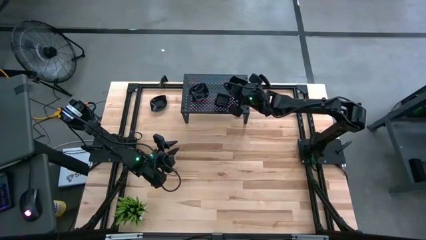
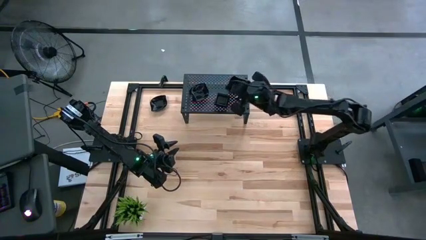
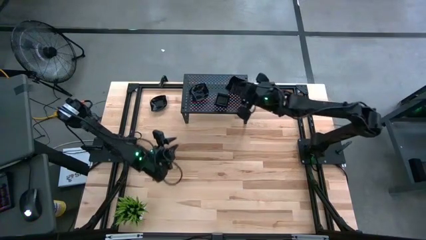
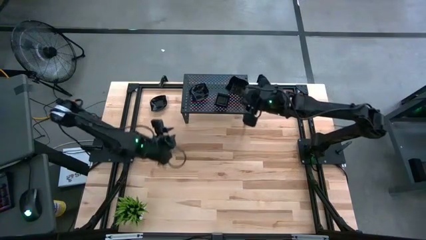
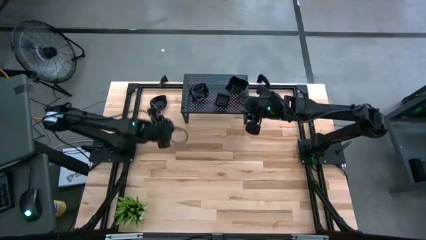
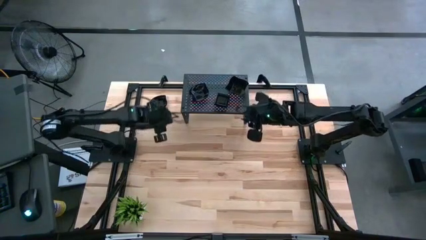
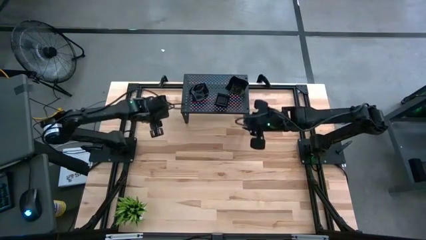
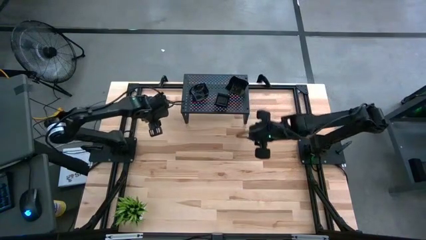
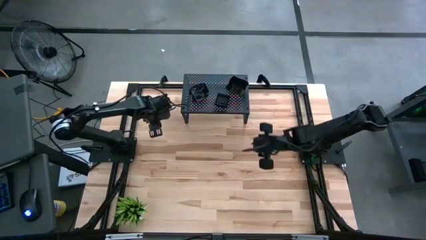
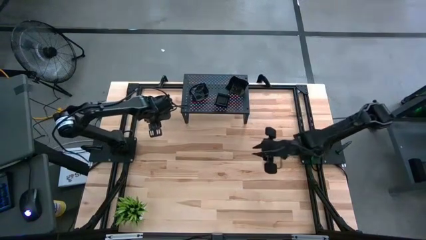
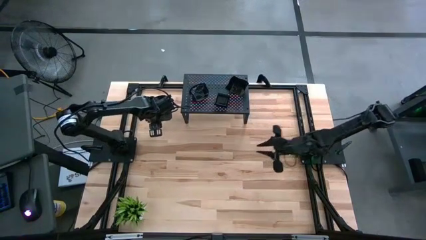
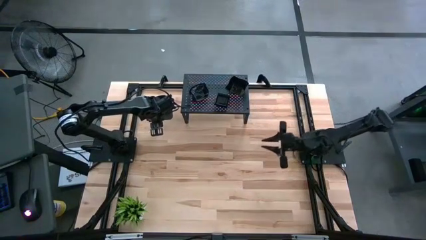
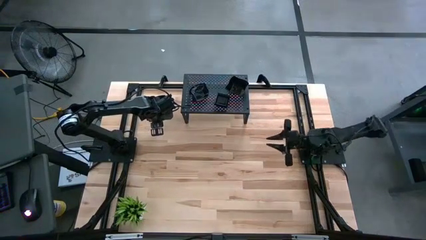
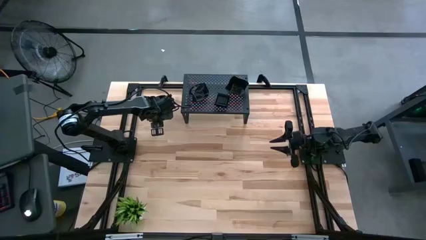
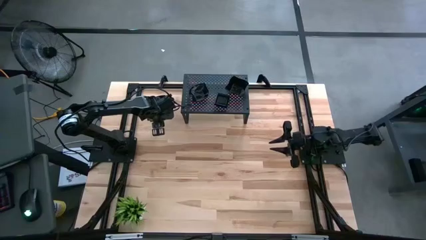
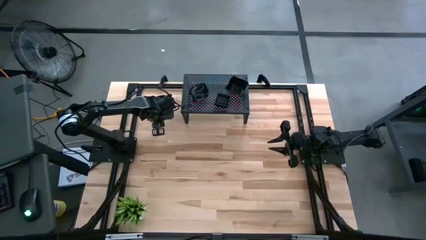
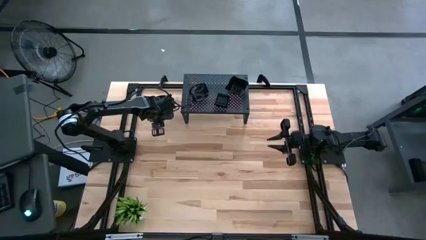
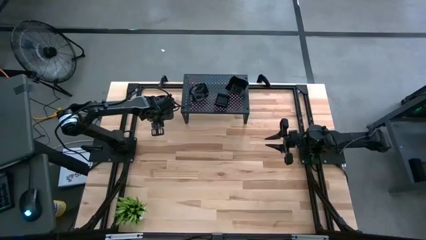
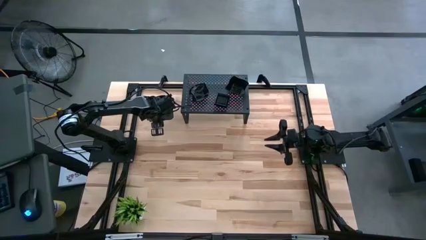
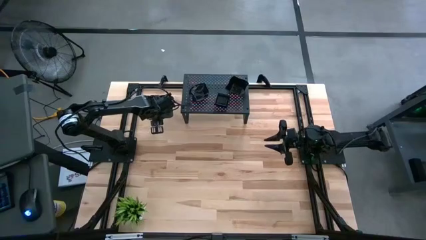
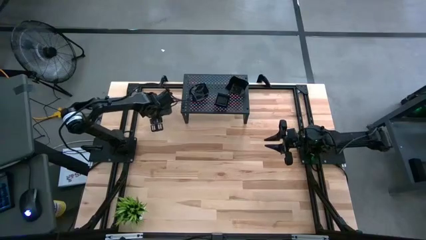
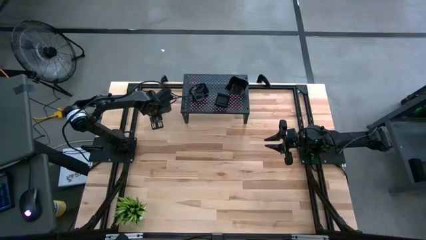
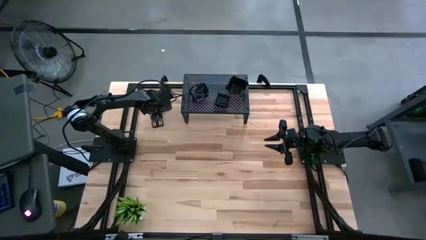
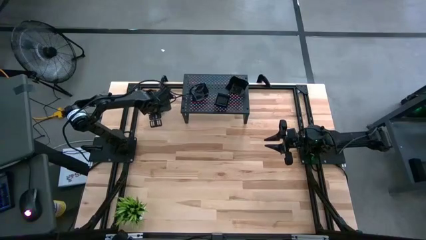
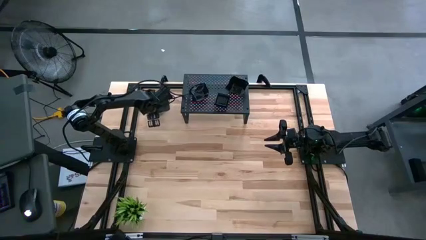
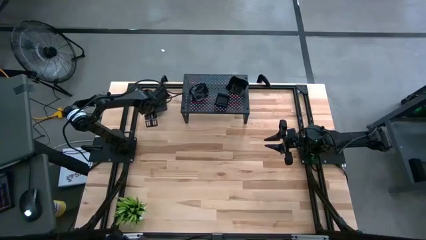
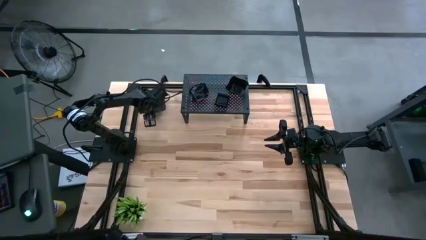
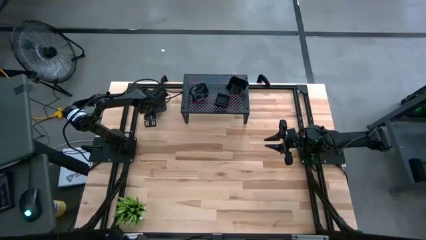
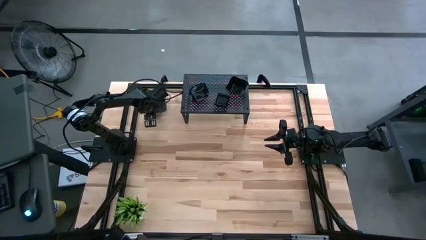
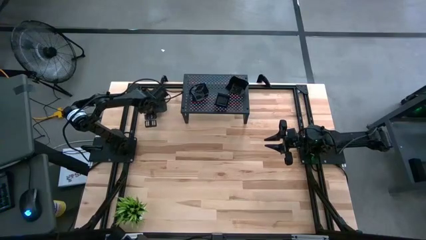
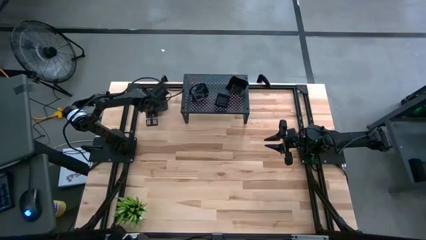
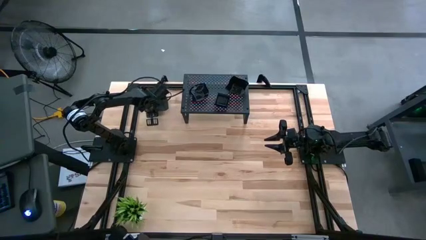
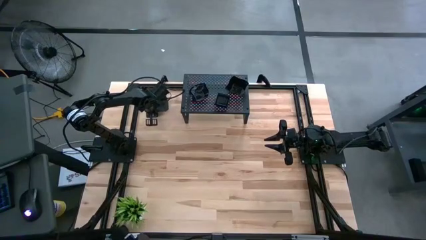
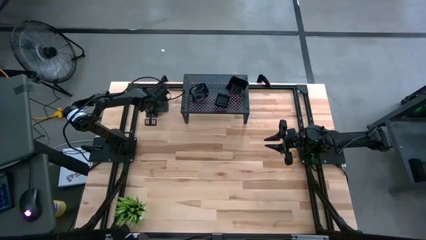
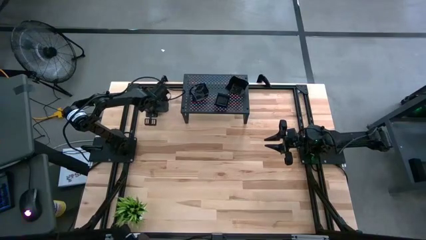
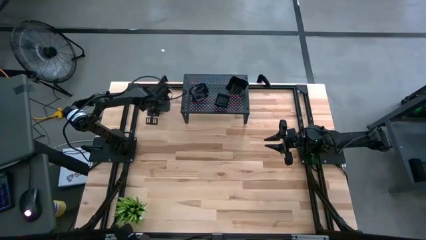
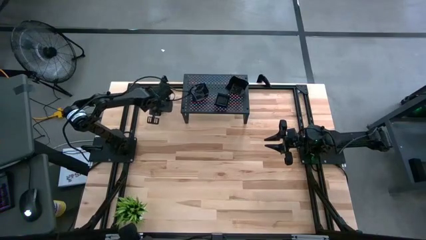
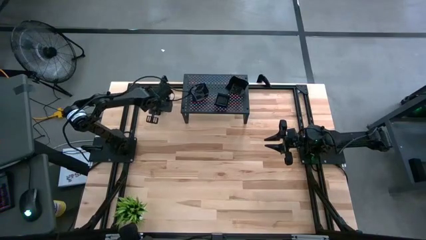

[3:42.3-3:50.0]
Task: Pick & Place Mini shaped plates
Stack the black leaf-shaped plate on top of the black leaf-shaped plate on the shelf

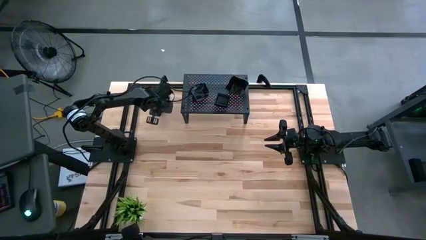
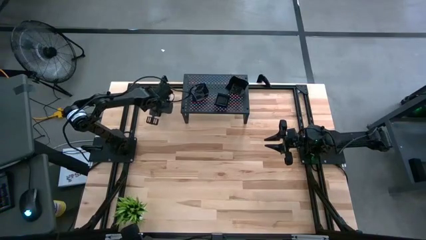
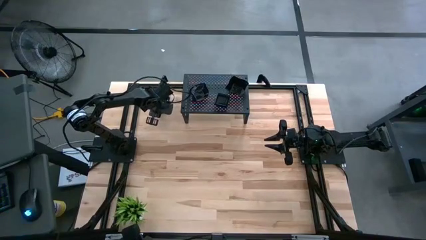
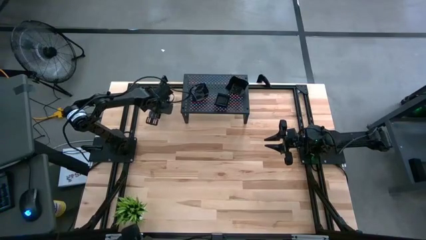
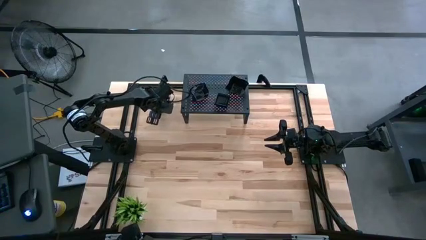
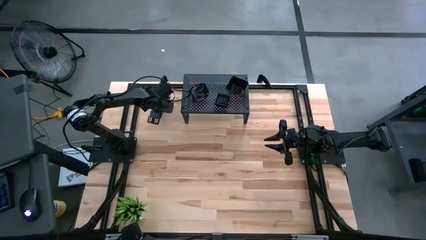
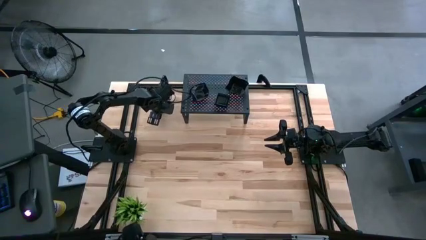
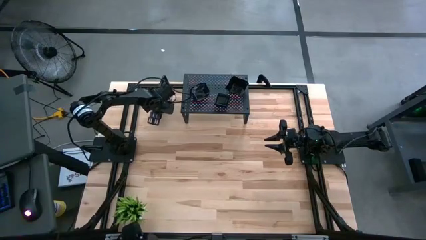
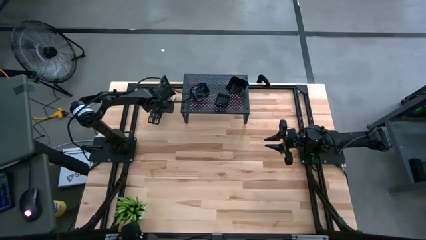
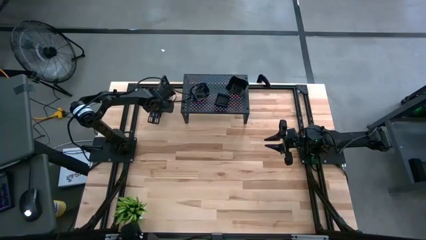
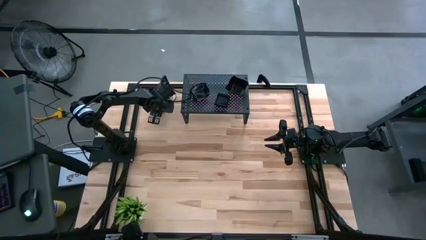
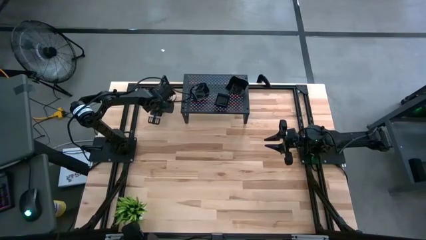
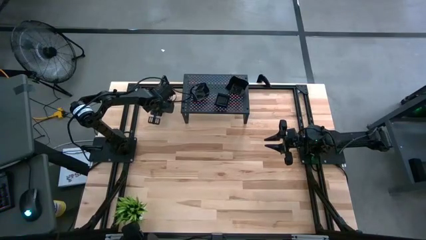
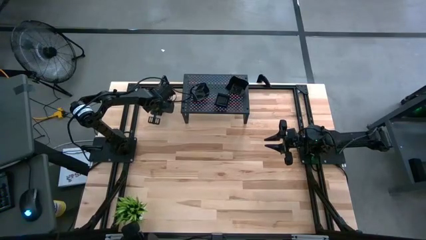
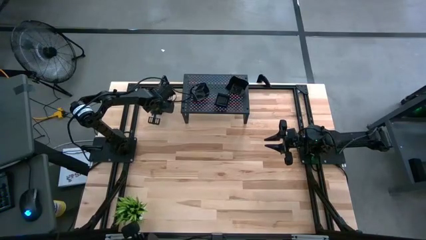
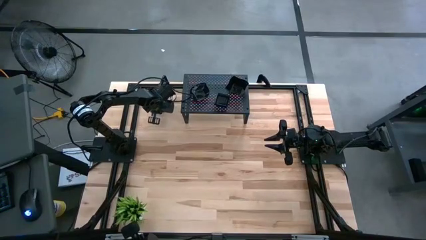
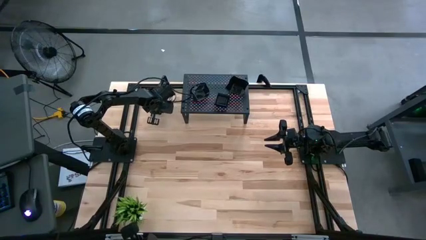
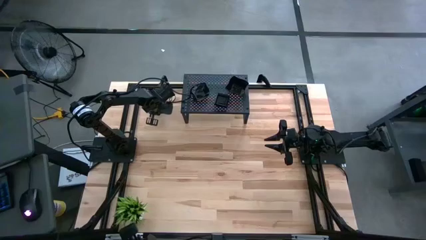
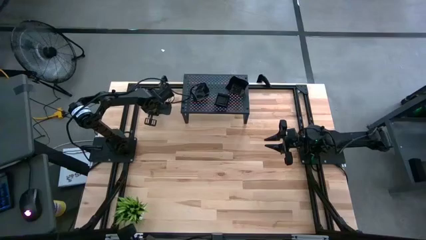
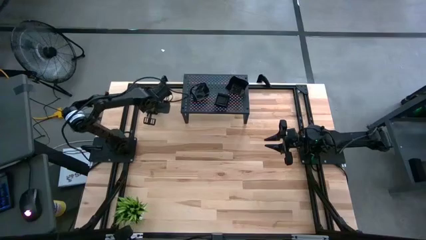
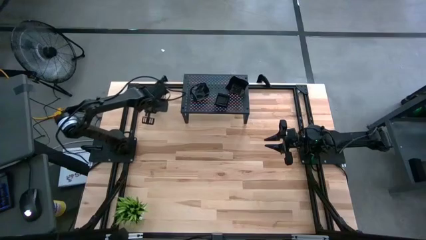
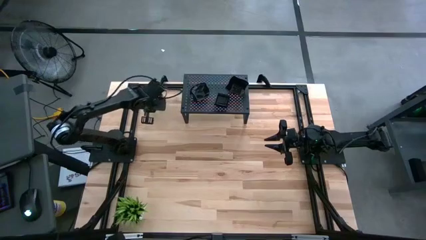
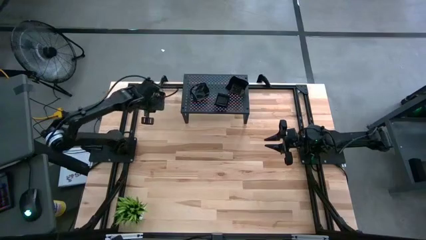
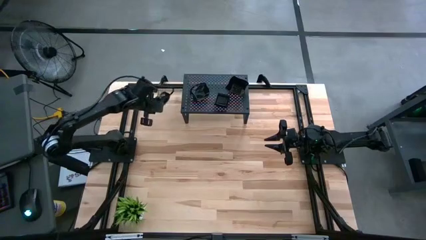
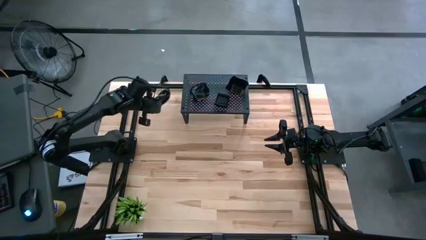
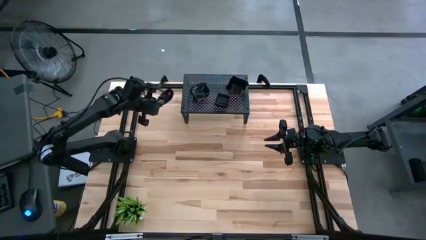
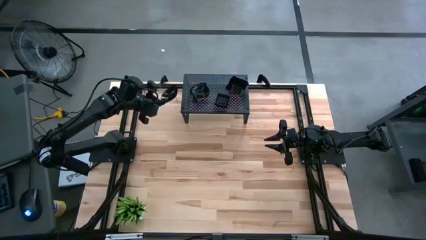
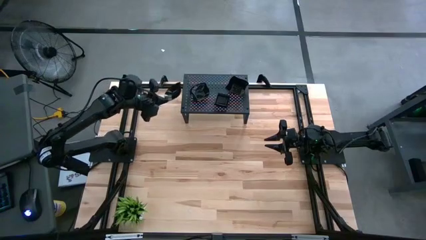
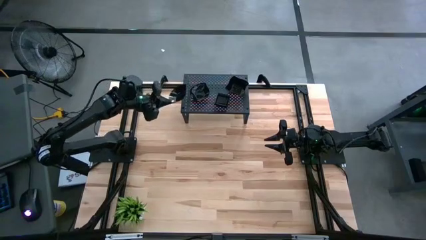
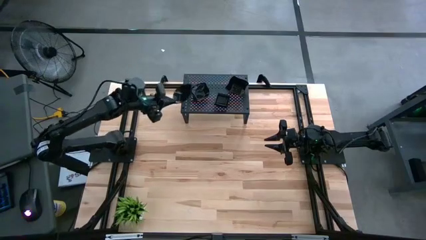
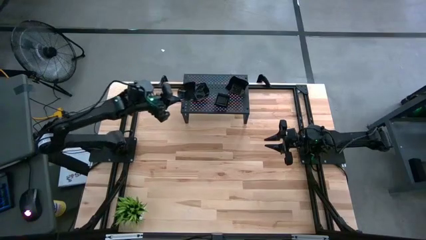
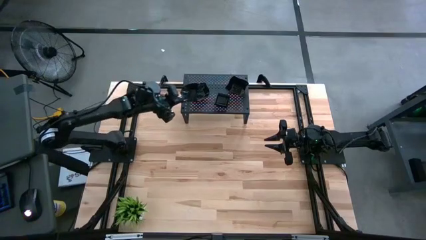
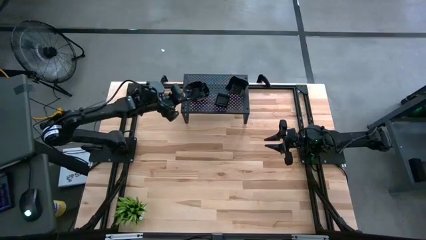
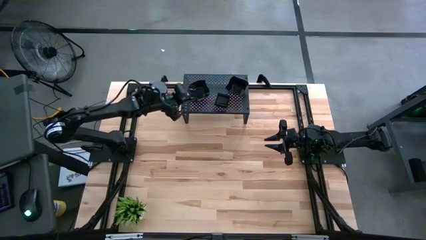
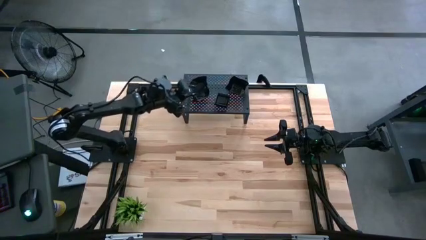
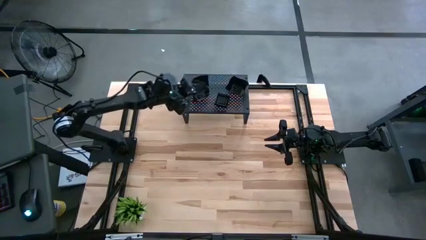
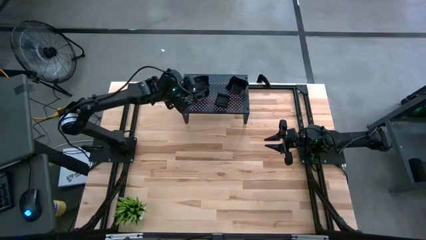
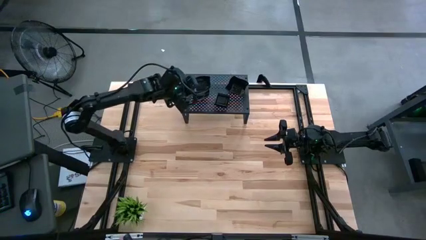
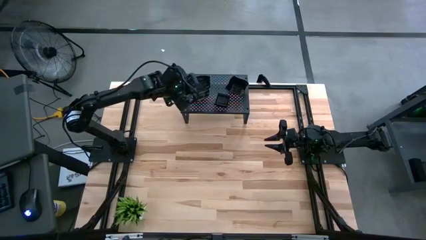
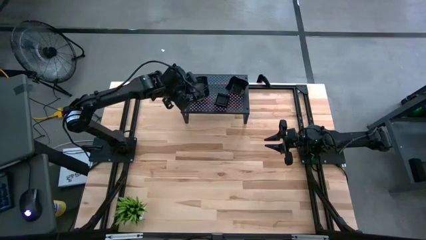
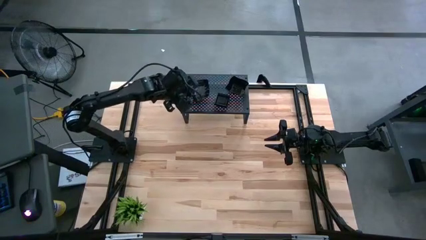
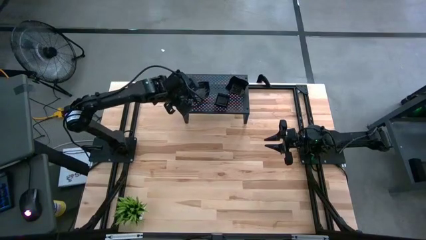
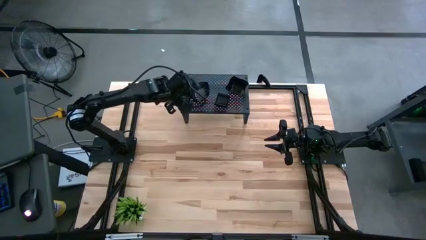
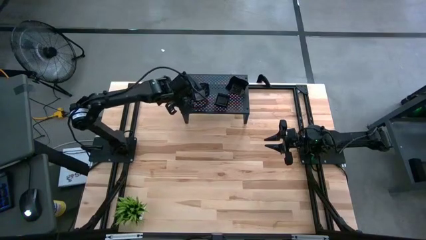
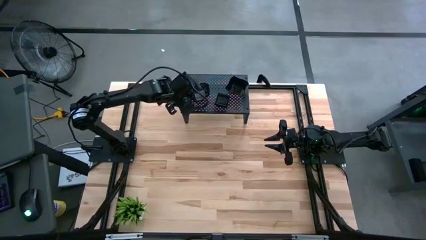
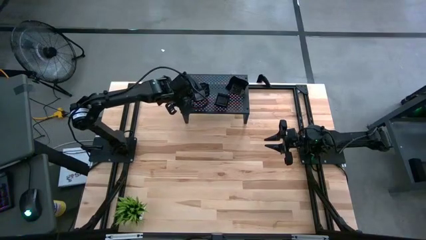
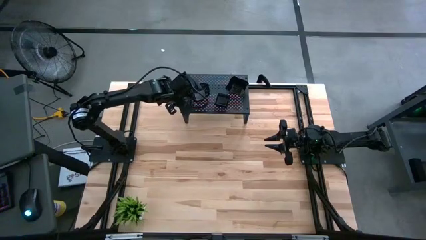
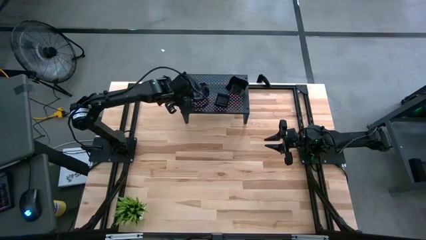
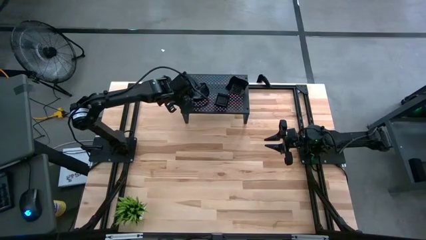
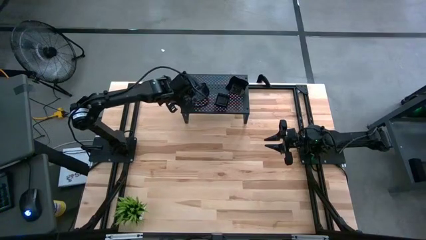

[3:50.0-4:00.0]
Stack the black leaf-shaped plate on top of the black leaf-shaped plate on the shelf
